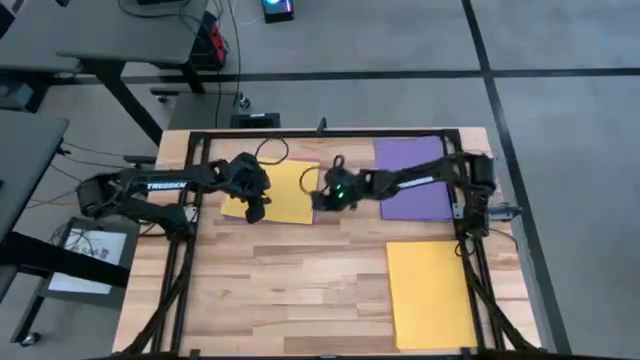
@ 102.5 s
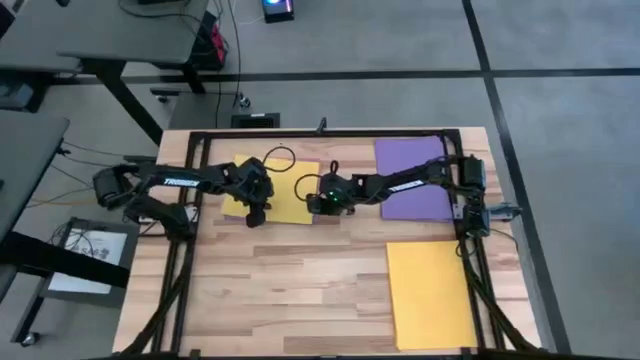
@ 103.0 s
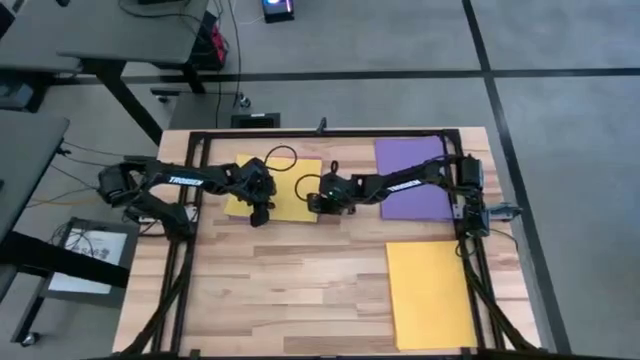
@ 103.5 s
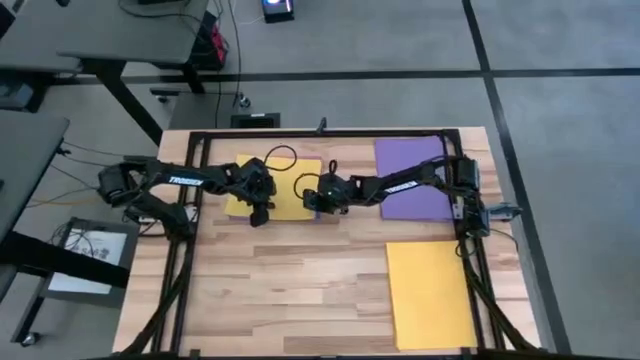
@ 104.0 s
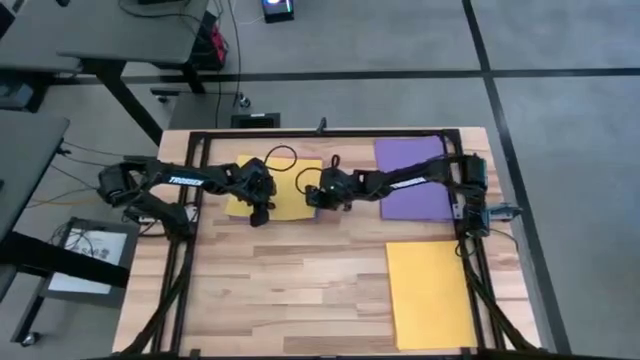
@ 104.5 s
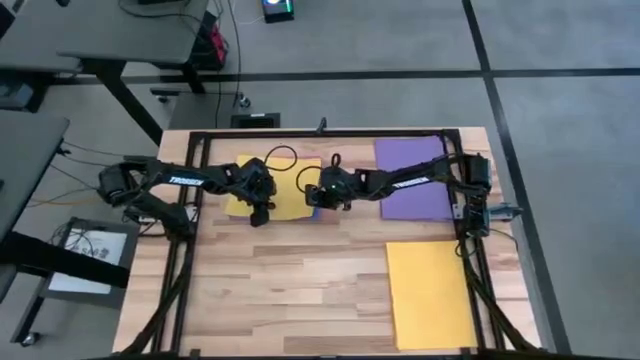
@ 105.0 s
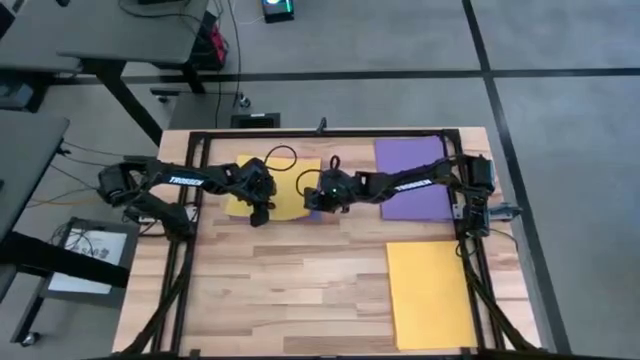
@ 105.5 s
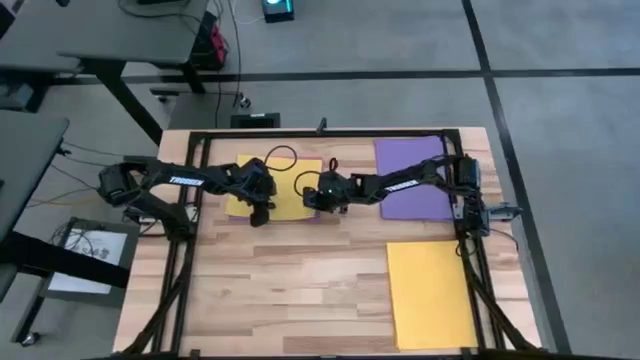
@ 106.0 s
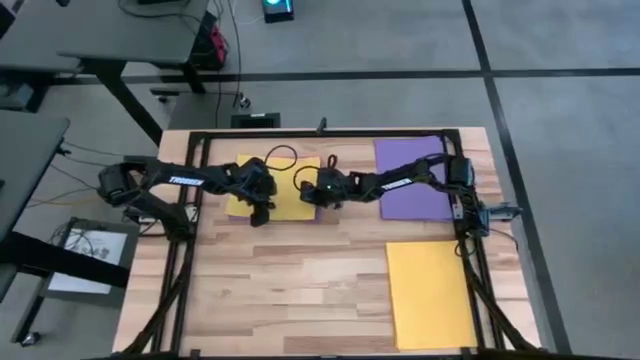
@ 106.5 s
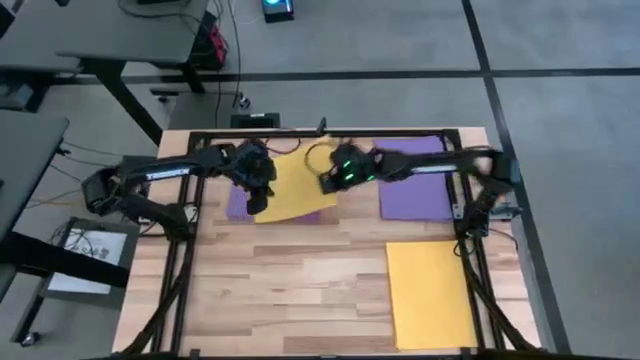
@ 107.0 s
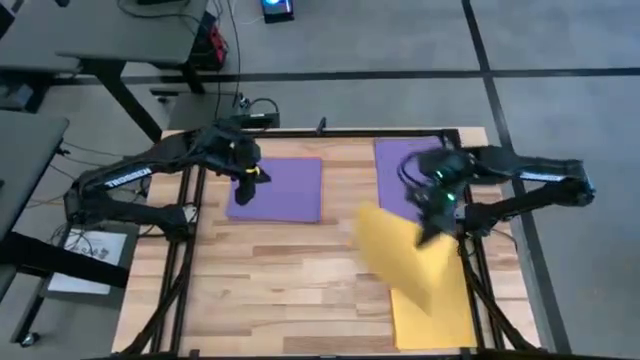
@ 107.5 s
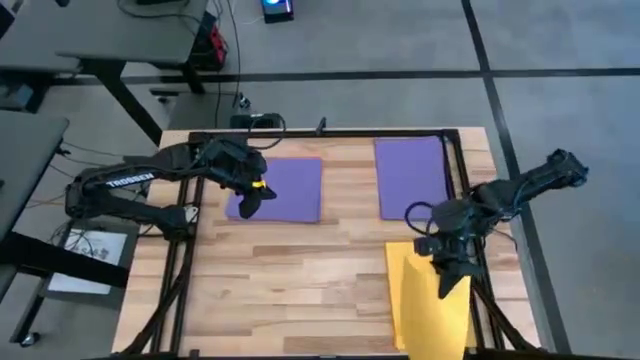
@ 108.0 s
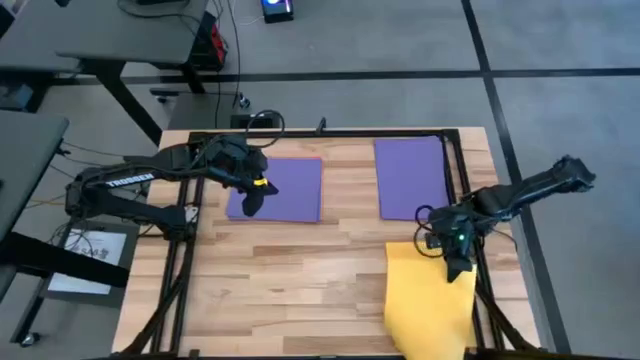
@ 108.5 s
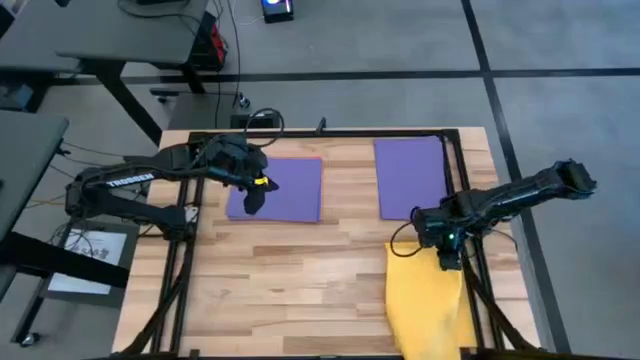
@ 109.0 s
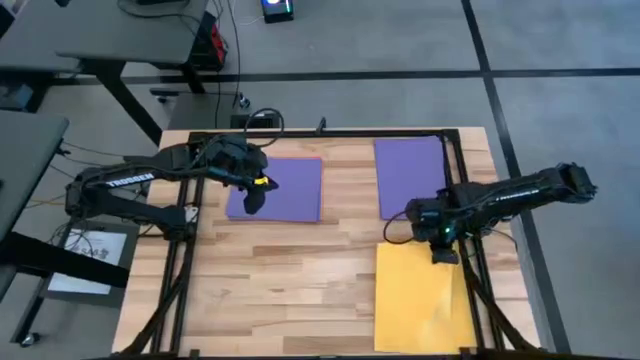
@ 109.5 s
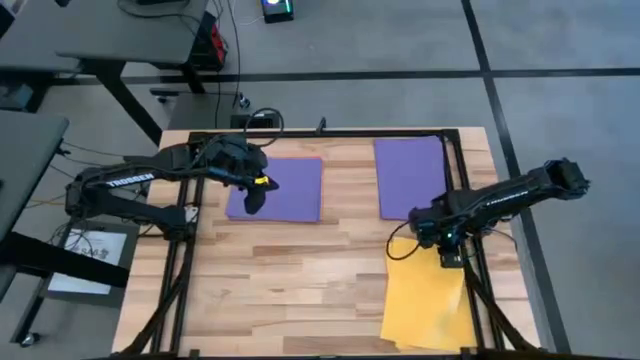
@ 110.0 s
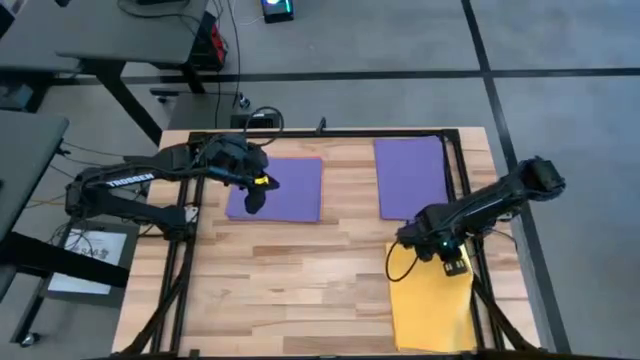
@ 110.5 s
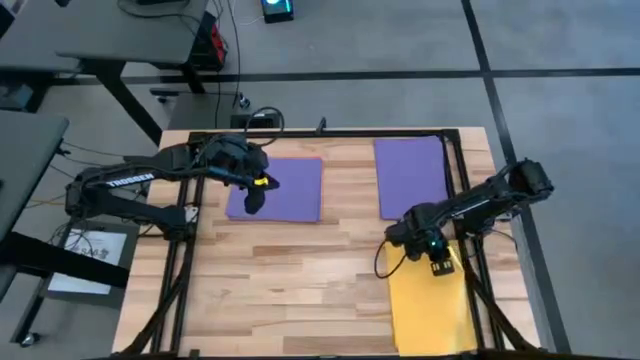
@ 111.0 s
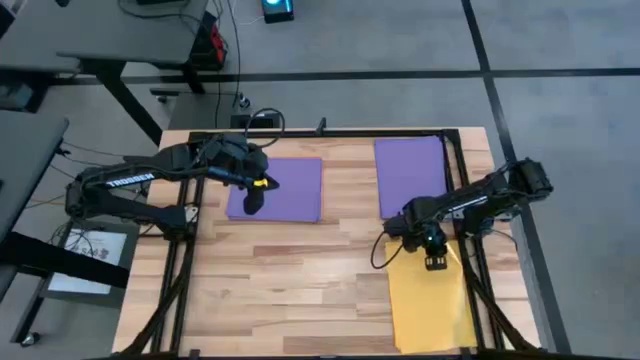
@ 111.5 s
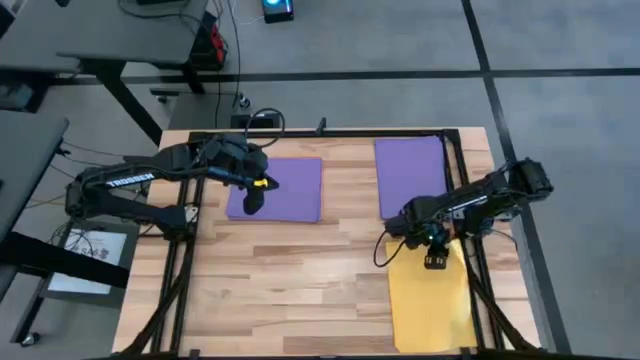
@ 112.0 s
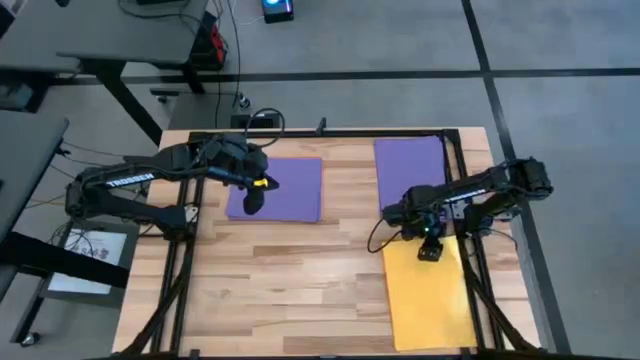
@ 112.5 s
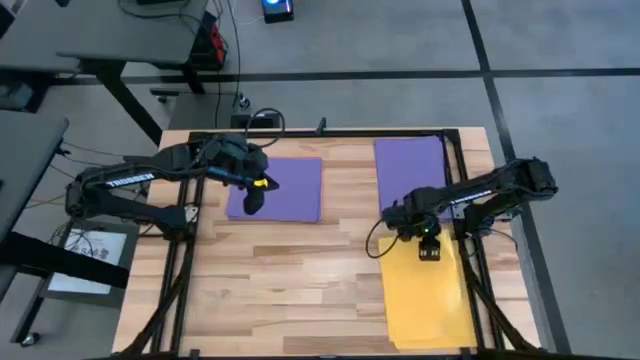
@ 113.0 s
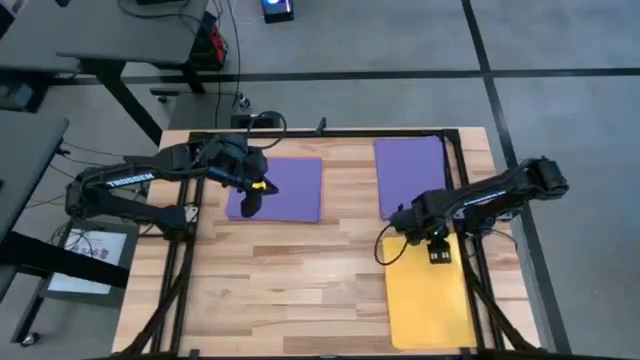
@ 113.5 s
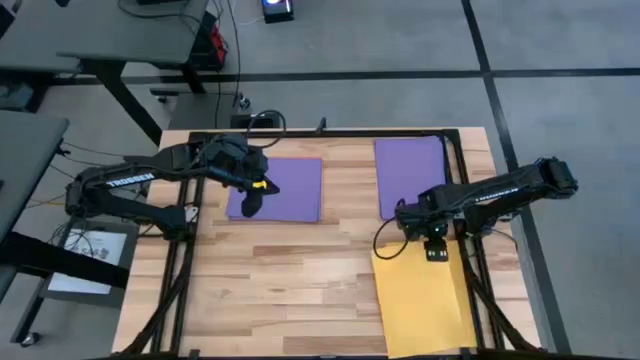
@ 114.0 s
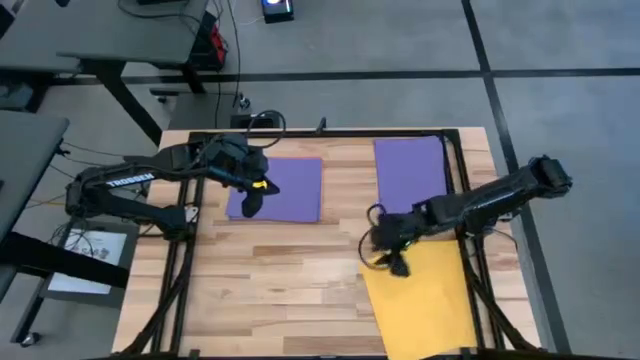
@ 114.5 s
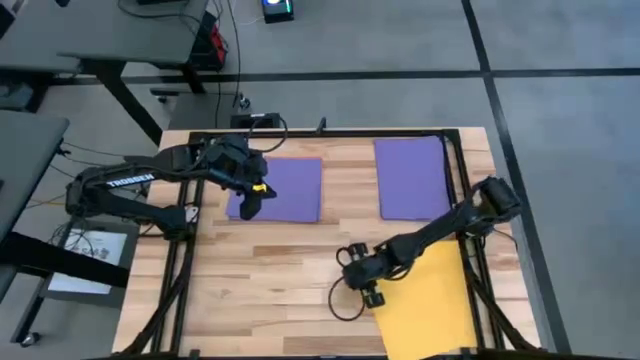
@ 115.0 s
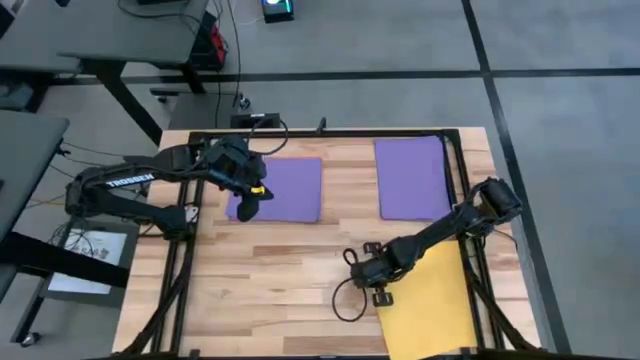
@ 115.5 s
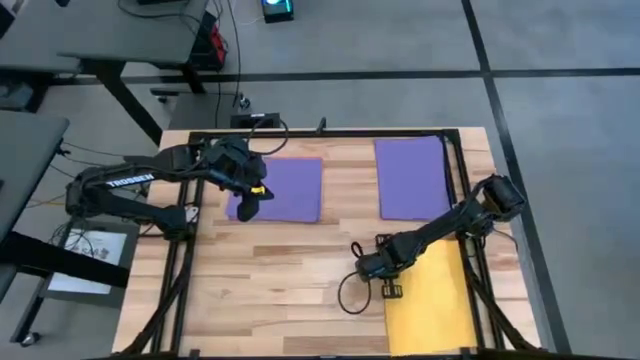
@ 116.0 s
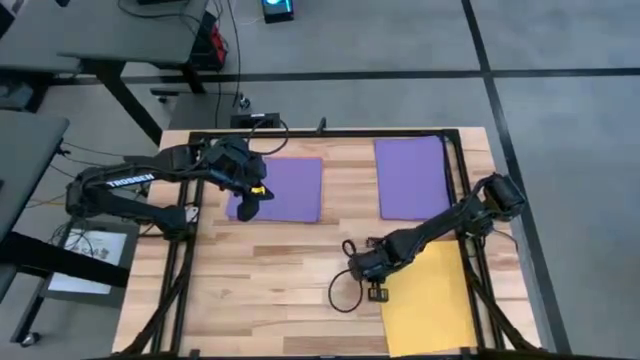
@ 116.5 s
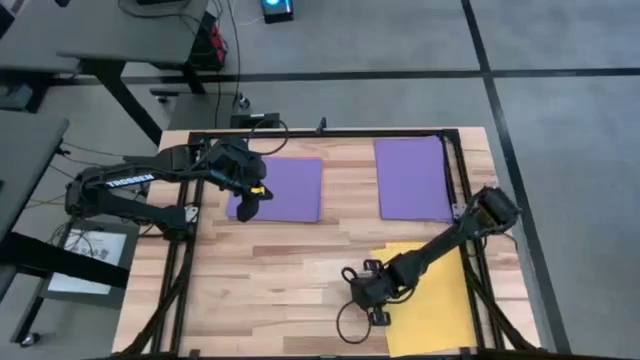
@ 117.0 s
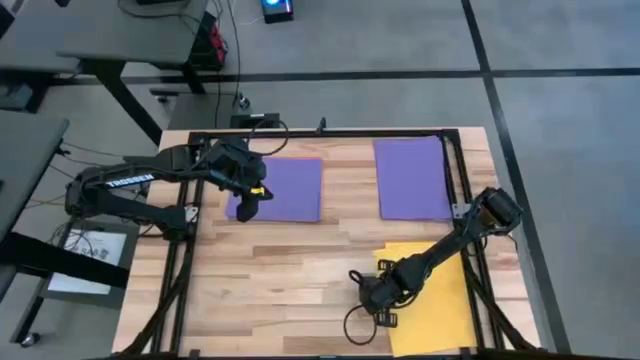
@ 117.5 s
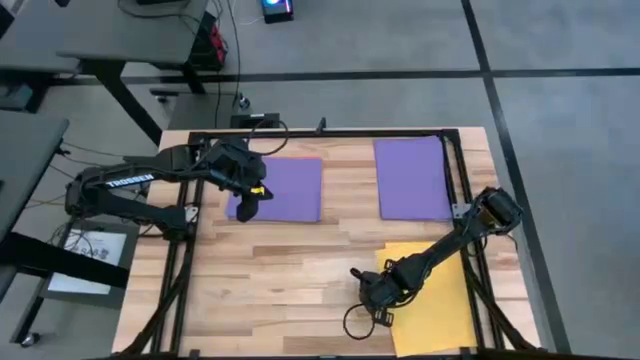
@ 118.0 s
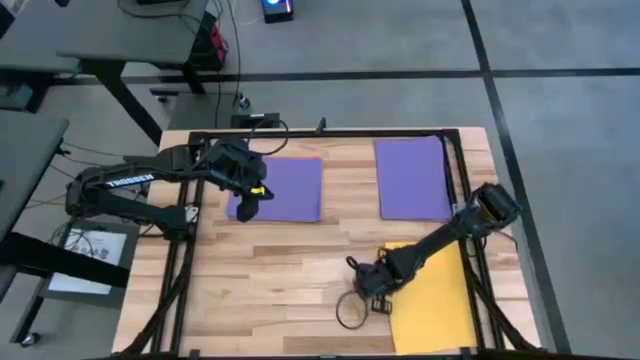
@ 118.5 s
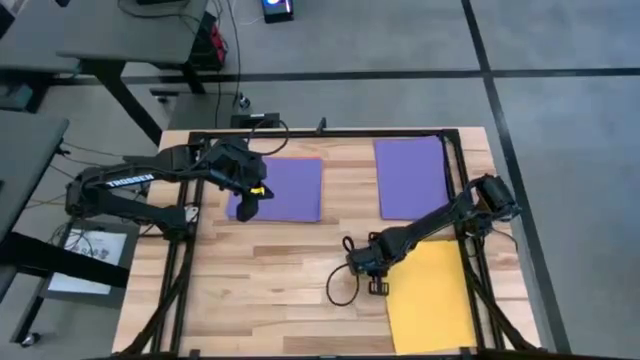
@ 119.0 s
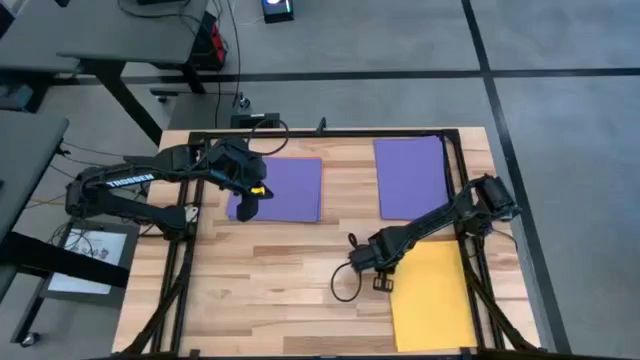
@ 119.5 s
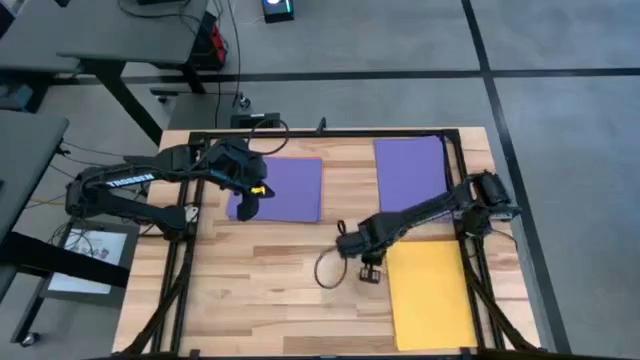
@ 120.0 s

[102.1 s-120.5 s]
Task: Organize paper
Stack the yellow paper on the bottom right yellow papers

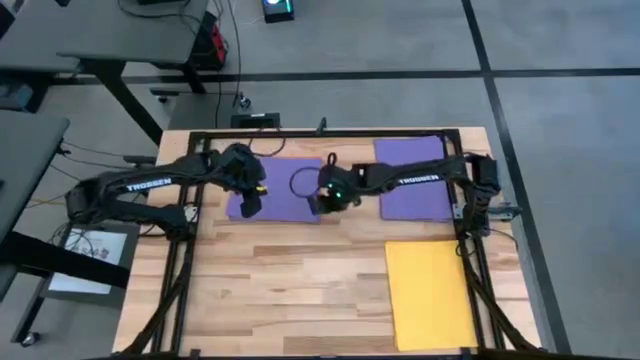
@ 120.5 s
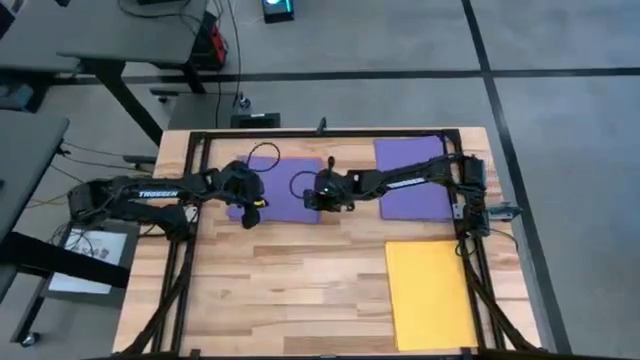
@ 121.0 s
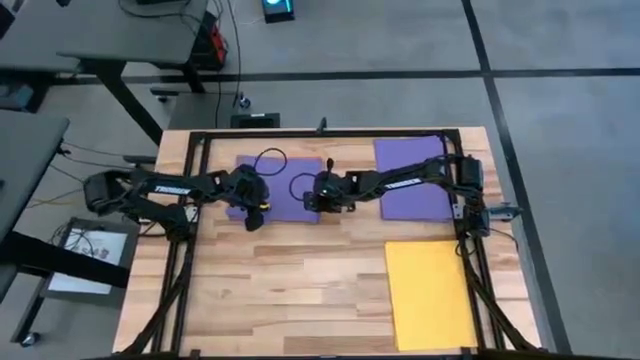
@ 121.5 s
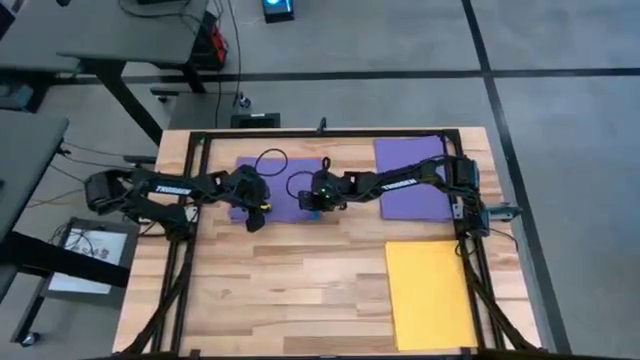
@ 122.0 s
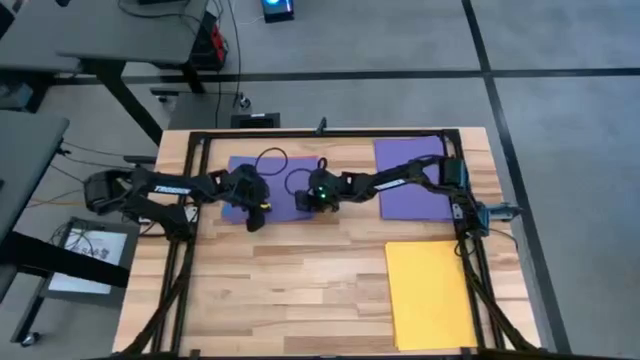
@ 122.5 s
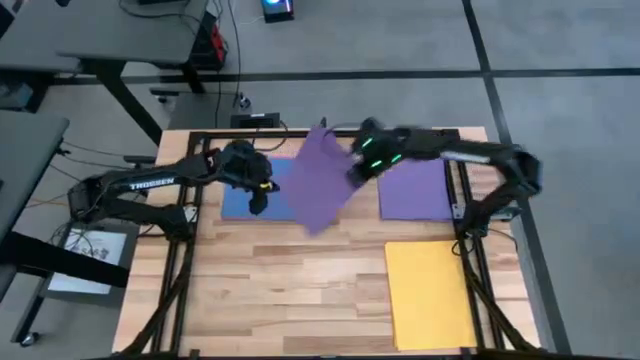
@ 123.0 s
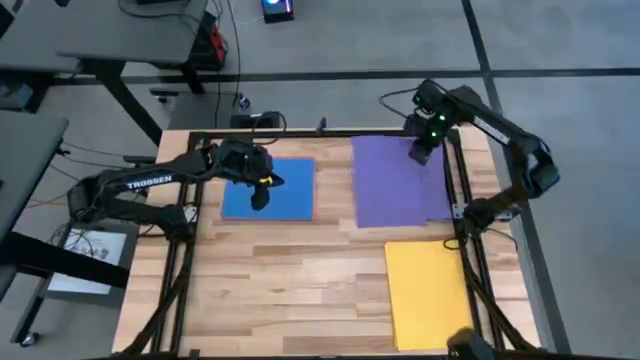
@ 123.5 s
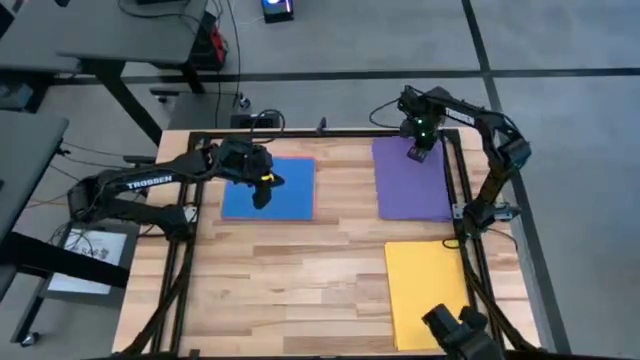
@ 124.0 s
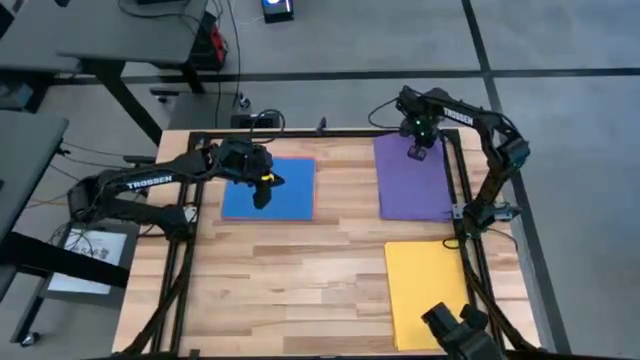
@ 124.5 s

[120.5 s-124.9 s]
Stack the purple paper on the top right purple papers
